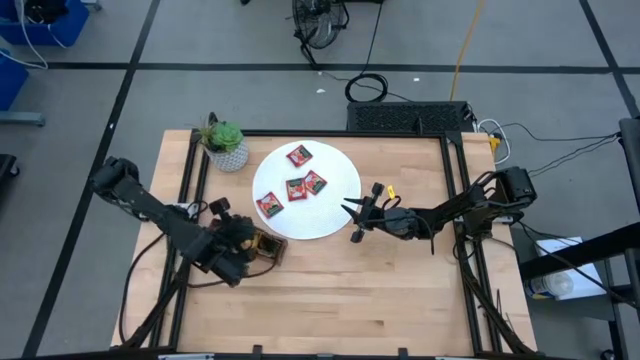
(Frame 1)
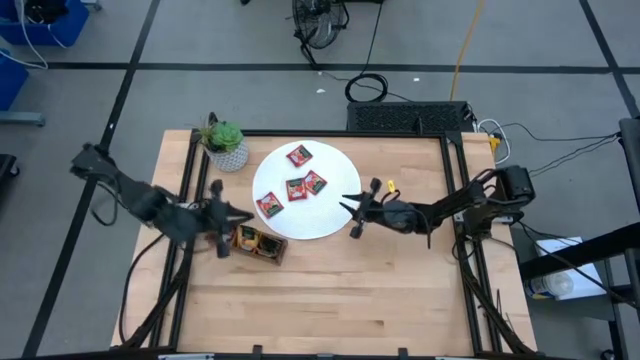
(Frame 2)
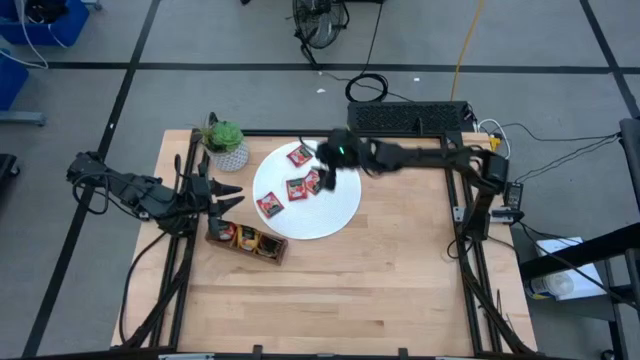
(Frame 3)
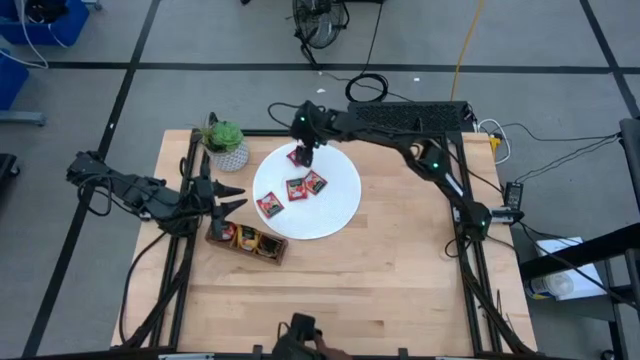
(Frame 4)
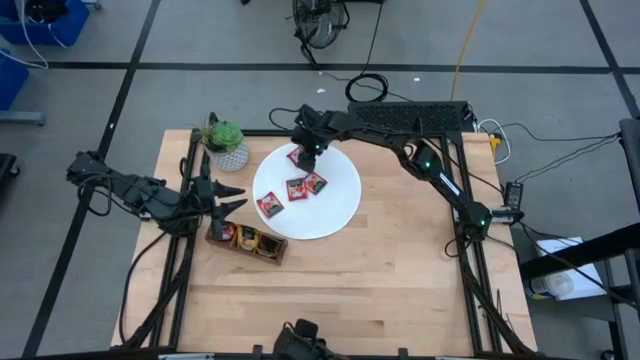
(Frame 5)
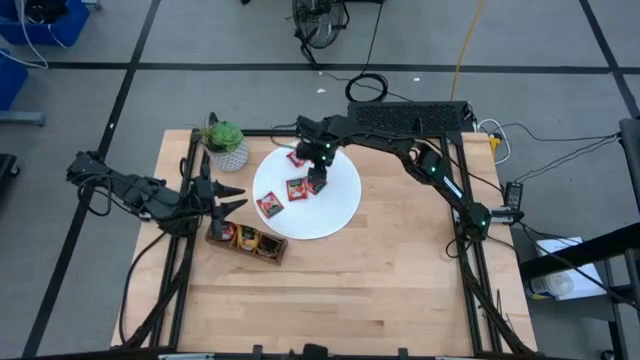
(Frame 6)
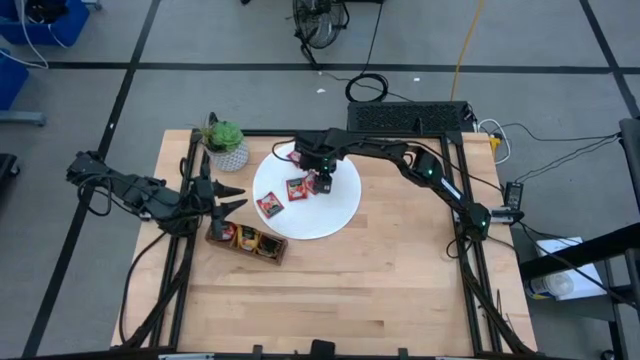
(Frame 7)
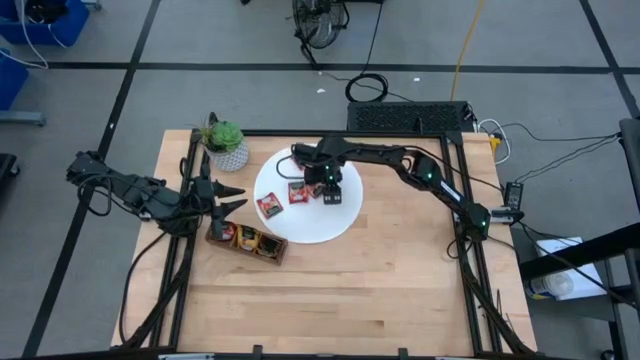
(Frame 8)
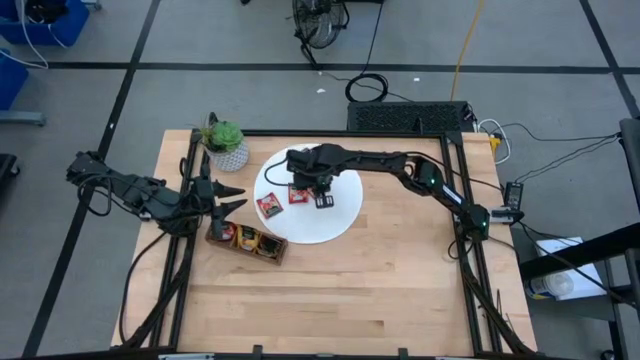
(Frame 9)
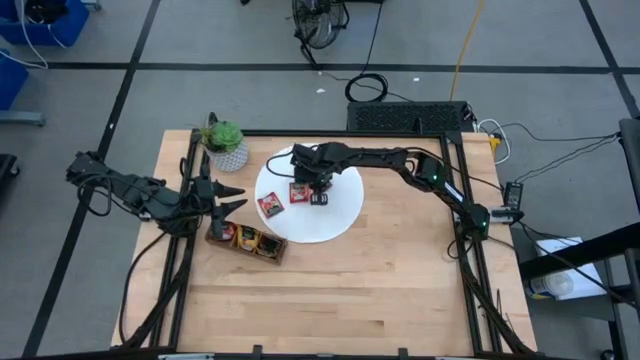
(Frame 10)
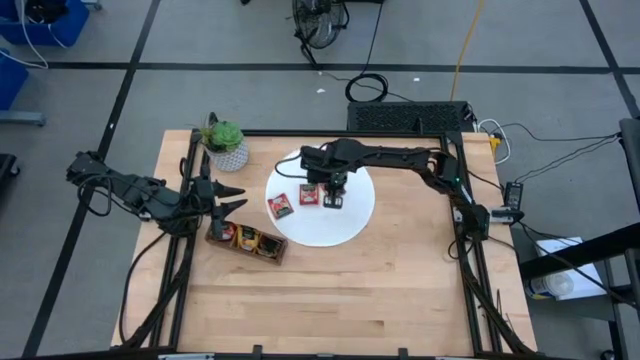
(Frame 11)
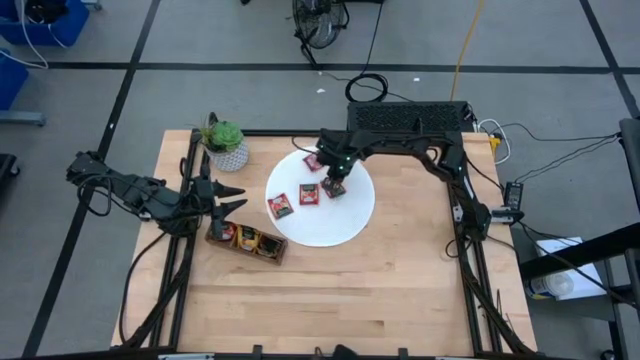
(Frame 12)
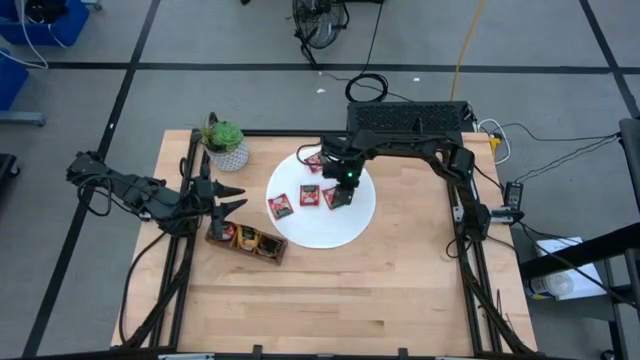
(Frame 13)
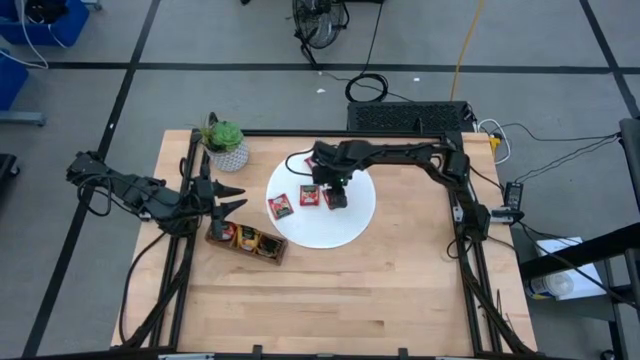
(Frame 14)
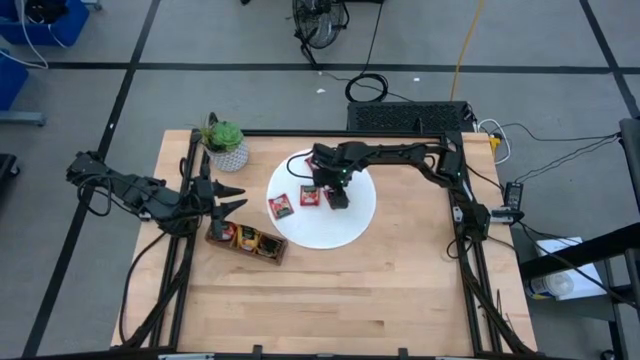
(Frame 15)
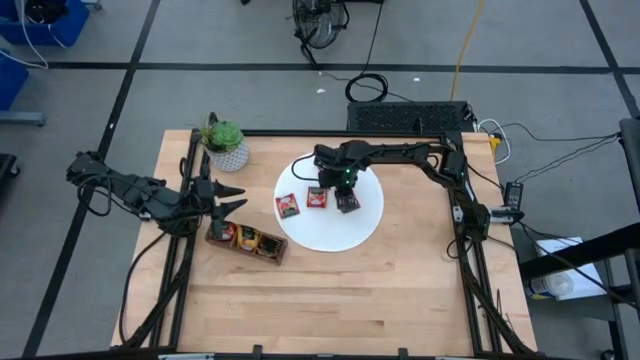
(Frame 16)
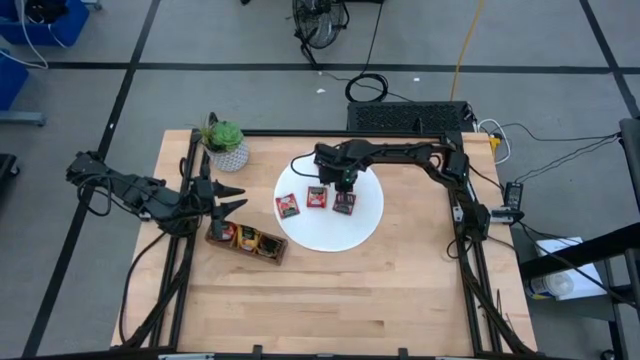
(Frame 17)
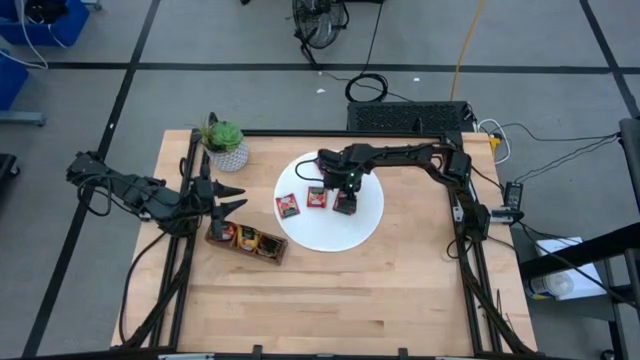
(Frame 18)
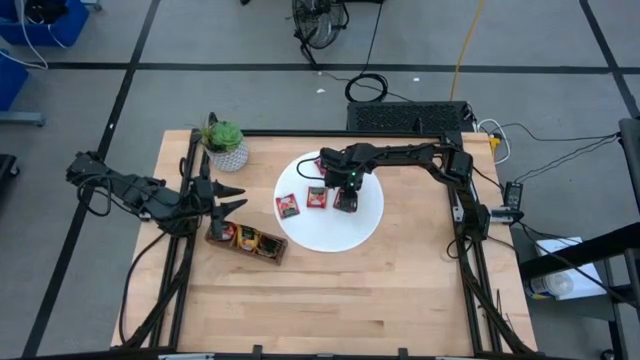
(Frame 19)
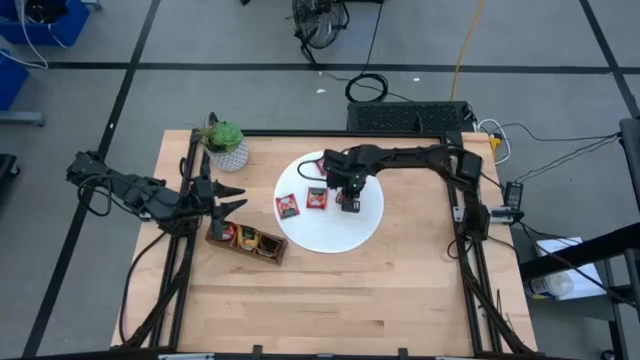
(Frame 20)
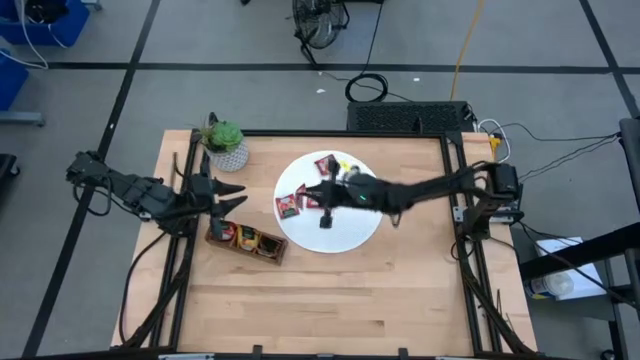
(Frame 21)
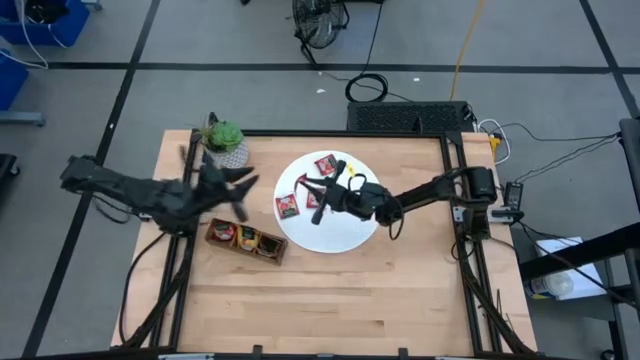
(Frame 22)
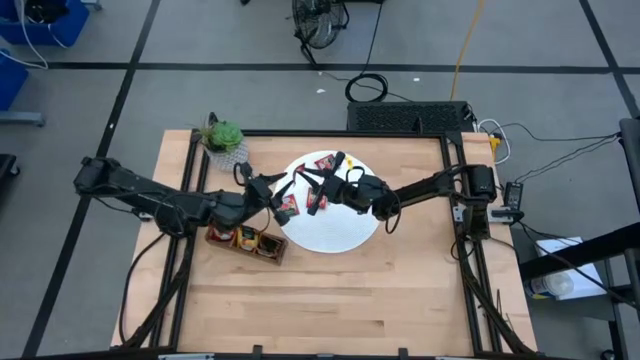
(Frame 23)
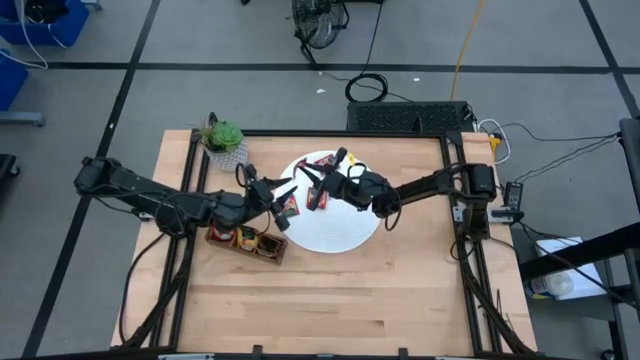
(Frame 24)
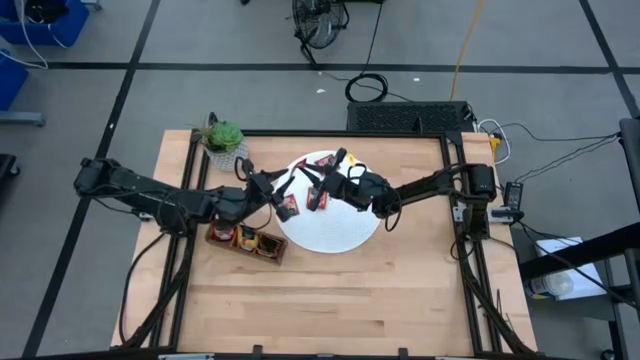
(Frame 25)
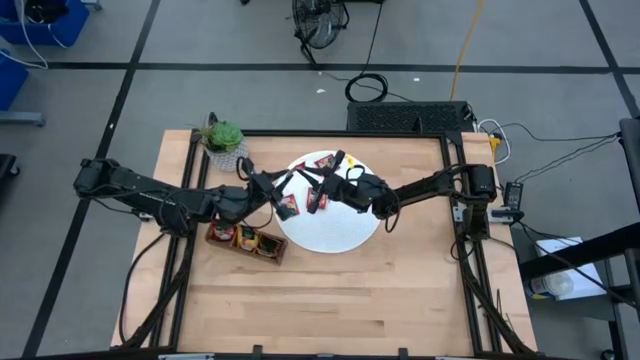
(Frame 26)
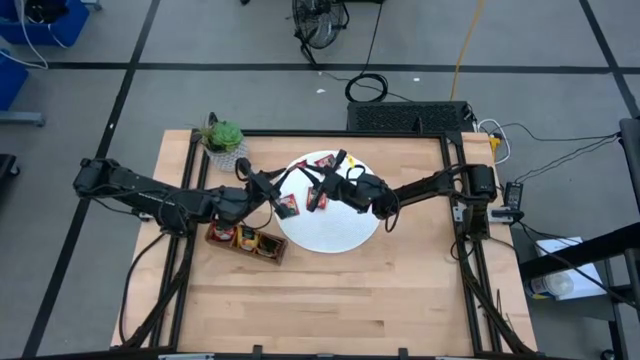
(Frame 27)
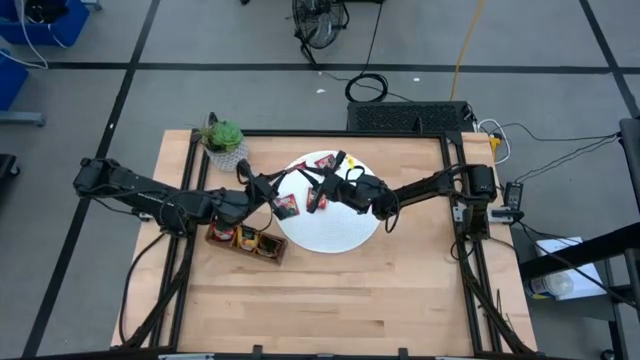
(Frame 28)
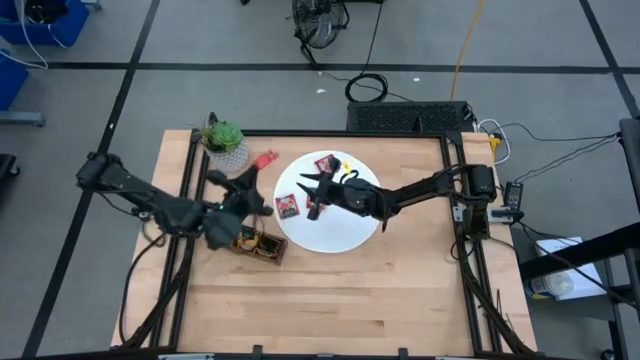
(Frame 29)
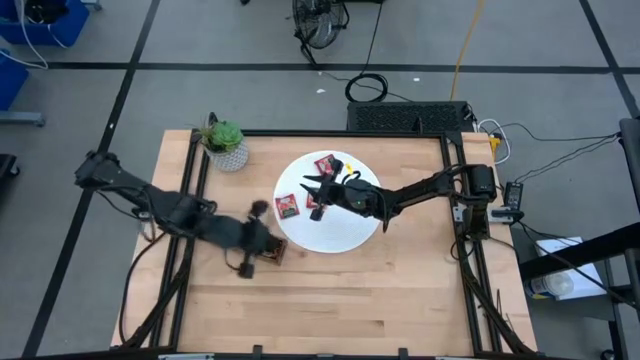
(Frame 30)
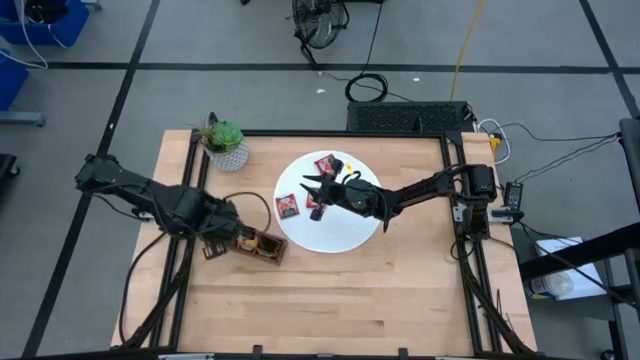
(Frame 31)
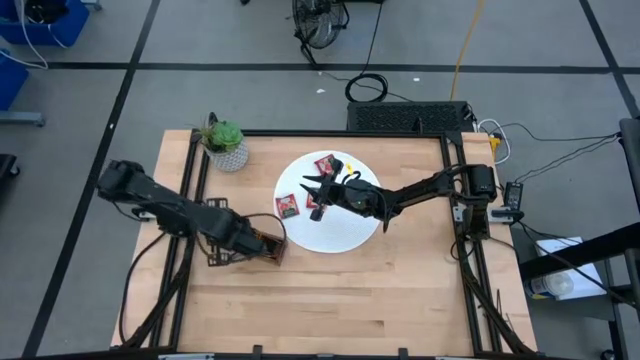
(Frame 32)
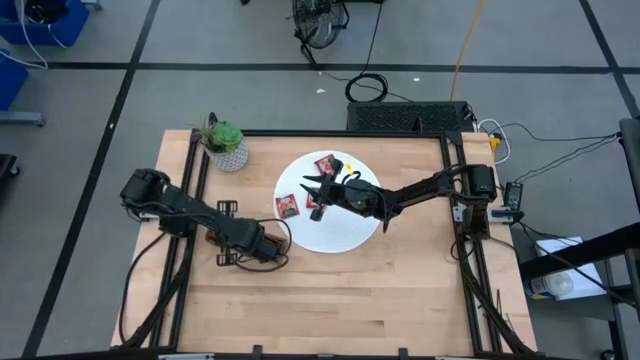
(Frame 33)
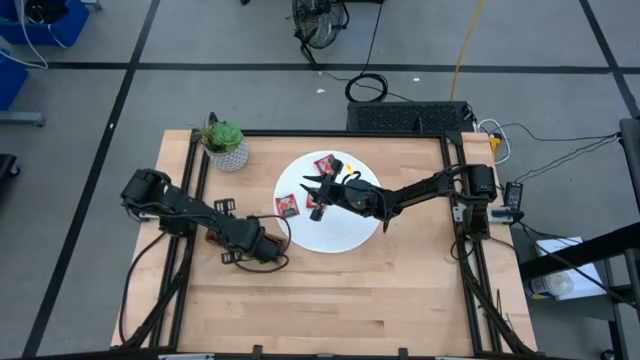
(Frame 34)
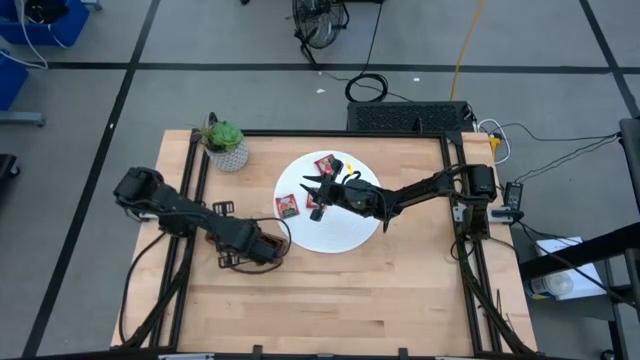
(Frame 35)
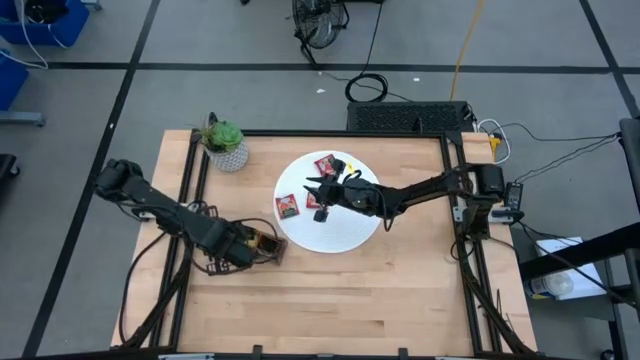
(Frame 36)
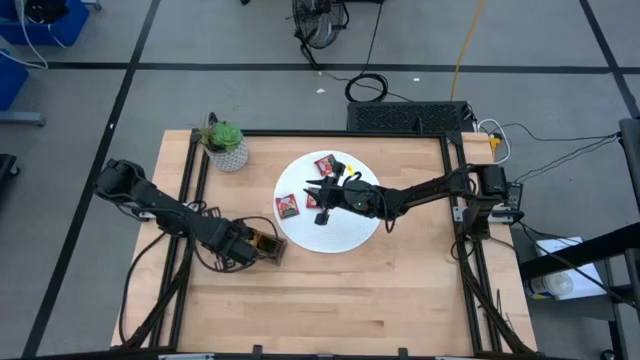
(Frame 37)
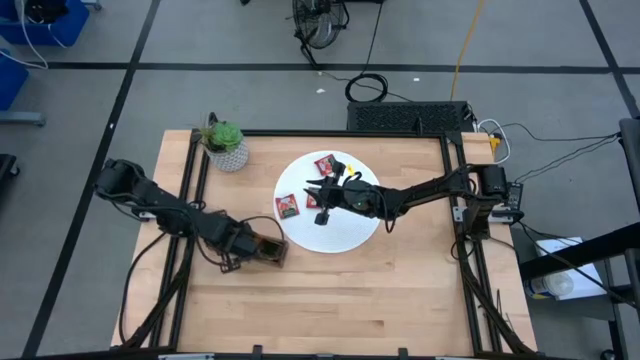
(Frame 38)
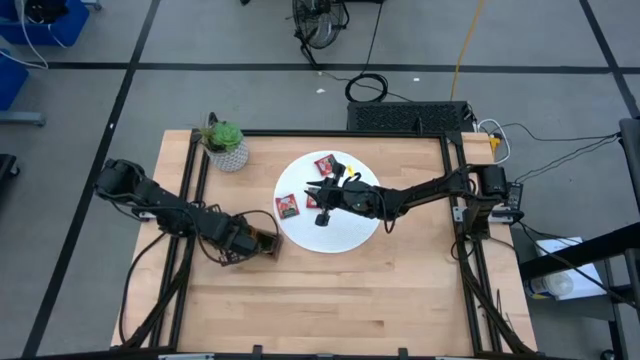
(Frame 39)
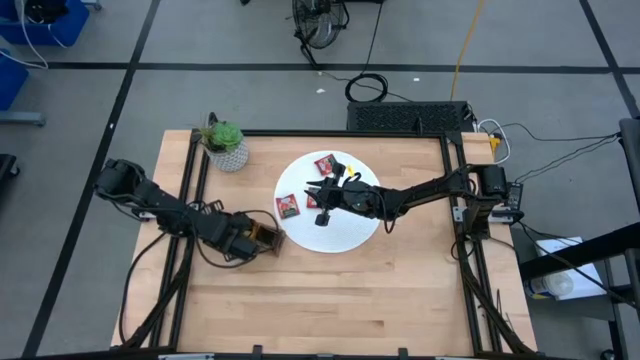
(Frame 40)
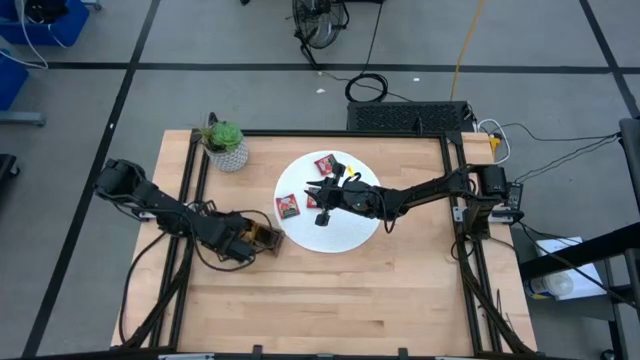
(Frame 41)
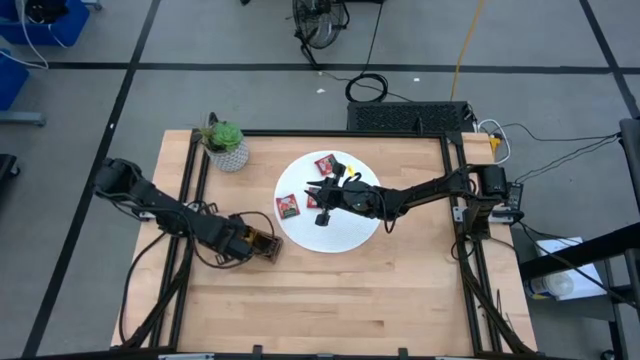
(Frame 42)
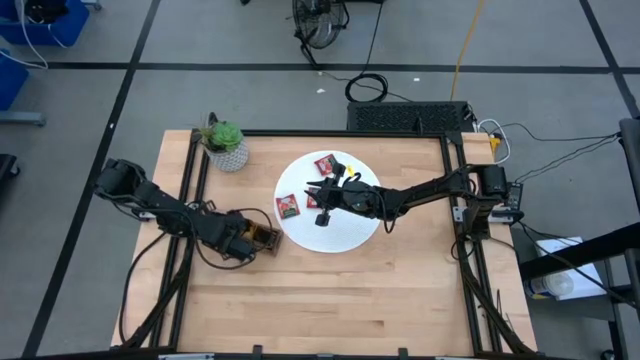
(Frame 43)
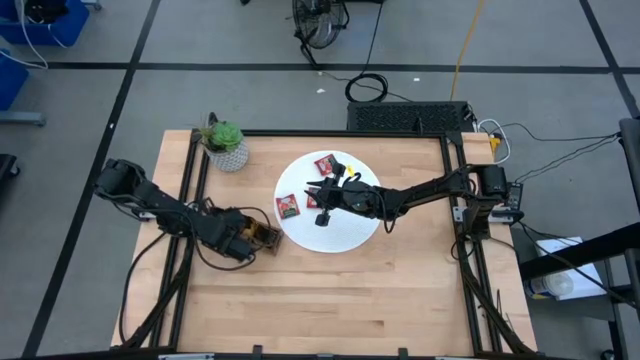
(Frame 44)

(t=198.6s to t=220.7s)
Task: Pick & Place Tea
Put the red tea bag into the left section of the wooden organizer
